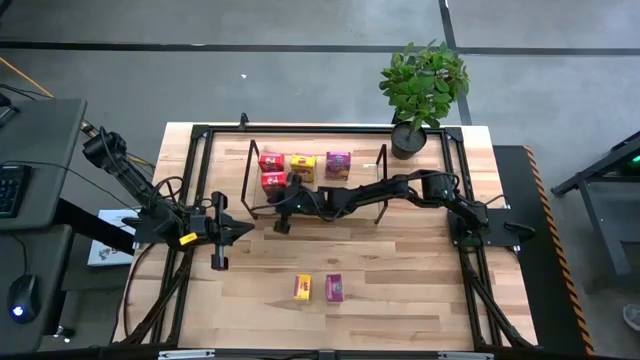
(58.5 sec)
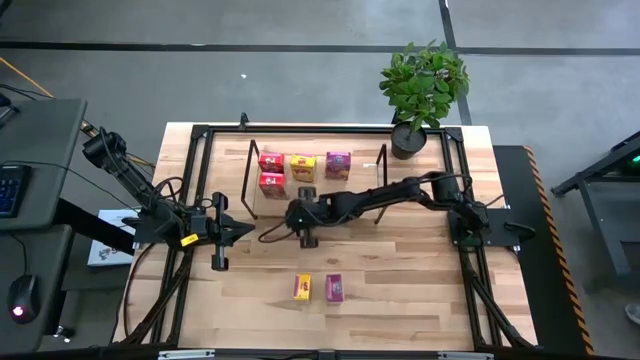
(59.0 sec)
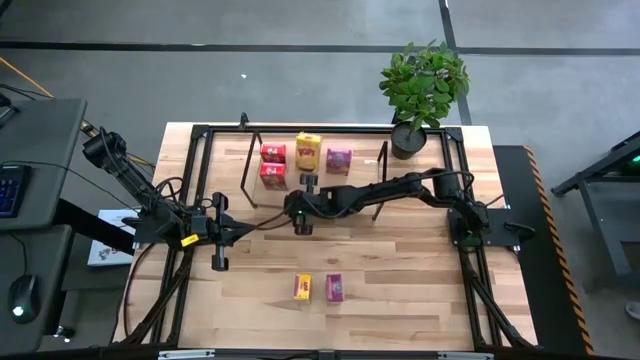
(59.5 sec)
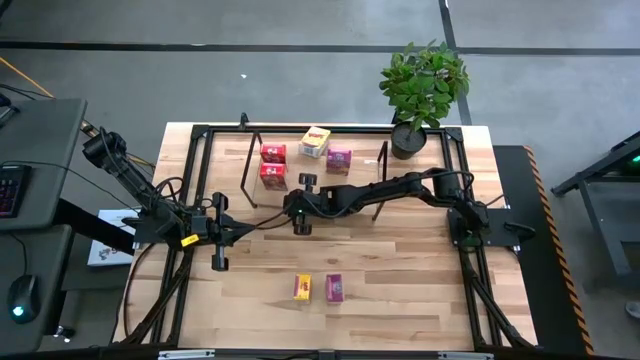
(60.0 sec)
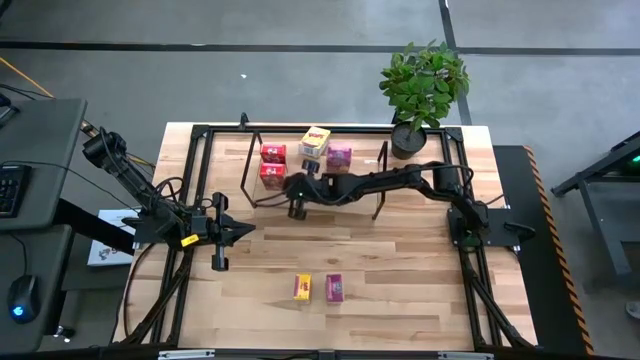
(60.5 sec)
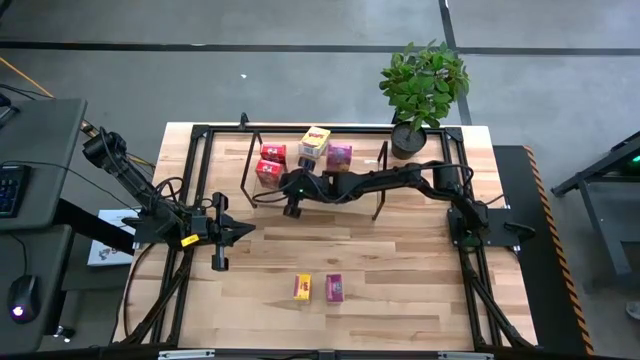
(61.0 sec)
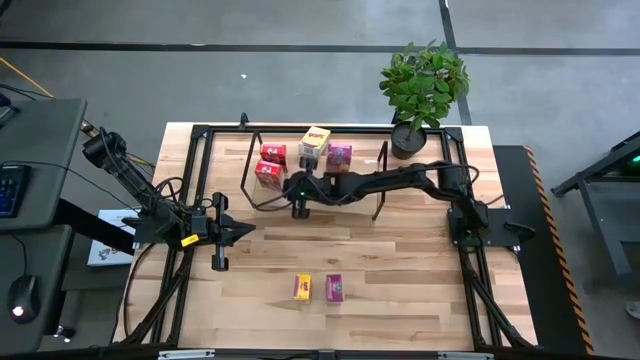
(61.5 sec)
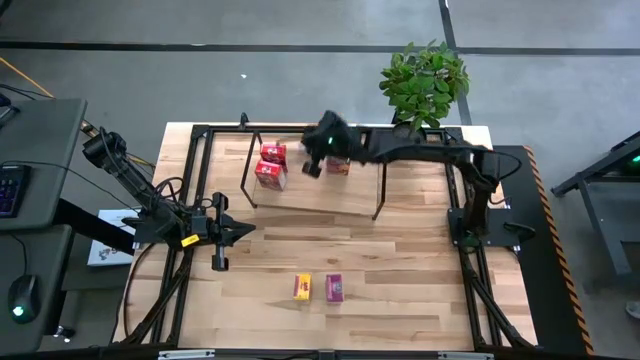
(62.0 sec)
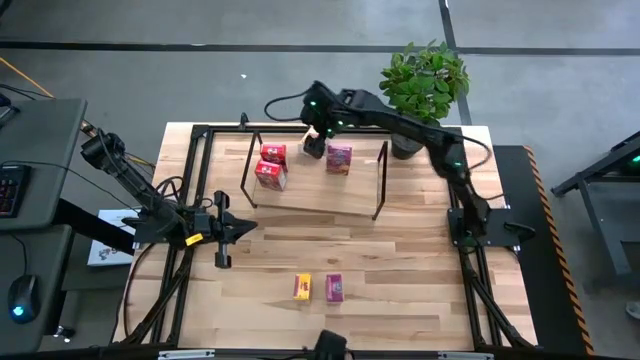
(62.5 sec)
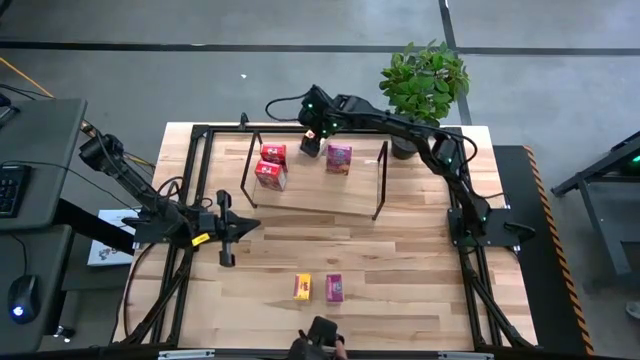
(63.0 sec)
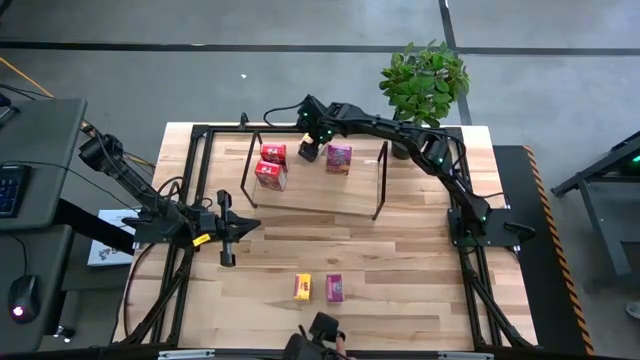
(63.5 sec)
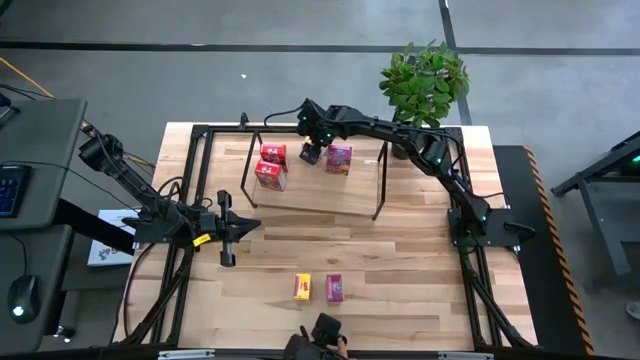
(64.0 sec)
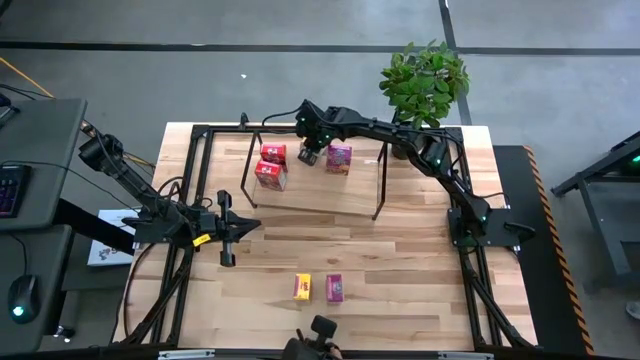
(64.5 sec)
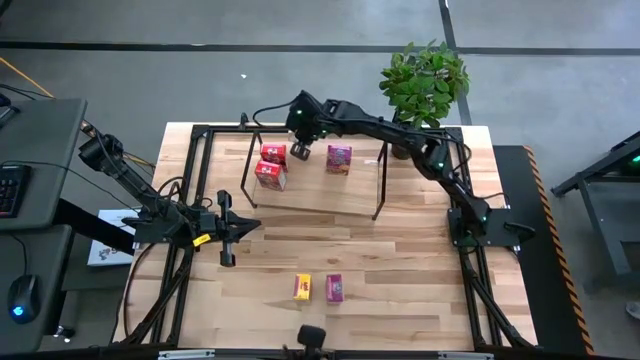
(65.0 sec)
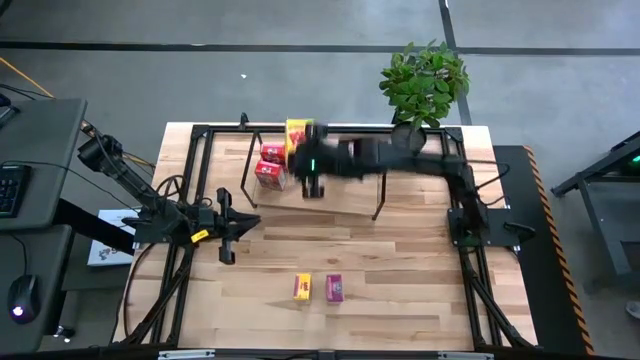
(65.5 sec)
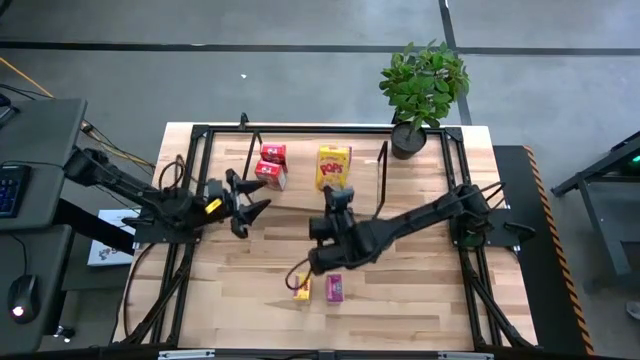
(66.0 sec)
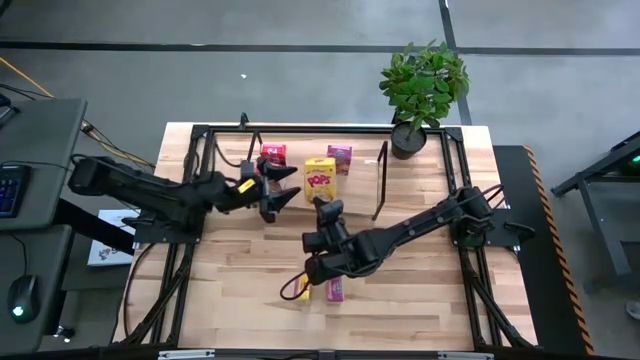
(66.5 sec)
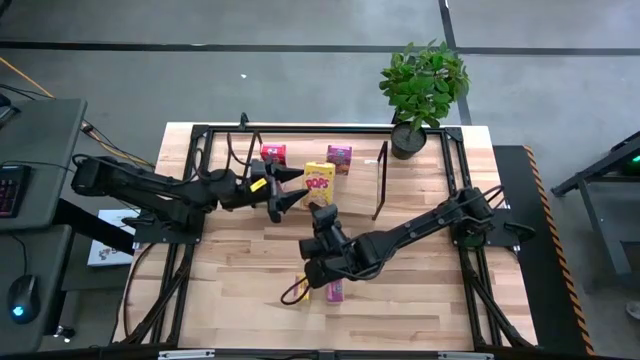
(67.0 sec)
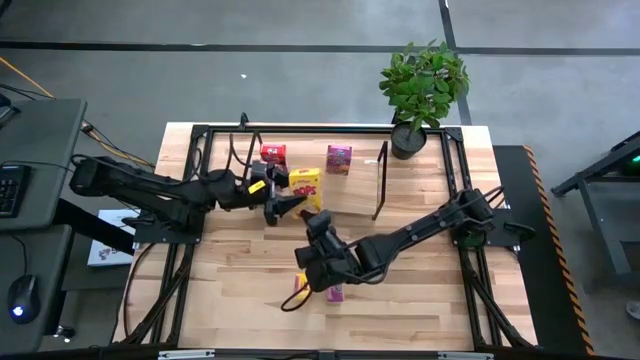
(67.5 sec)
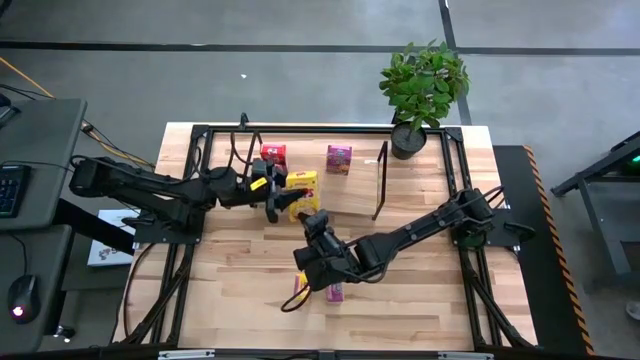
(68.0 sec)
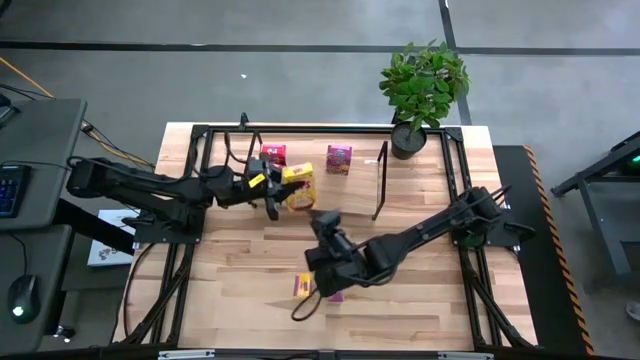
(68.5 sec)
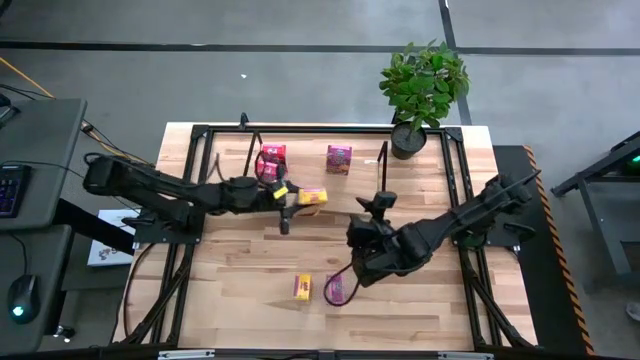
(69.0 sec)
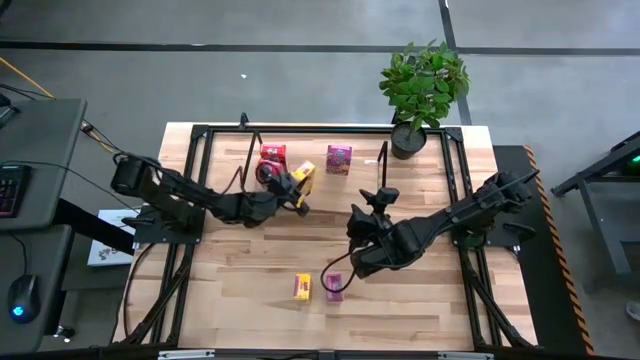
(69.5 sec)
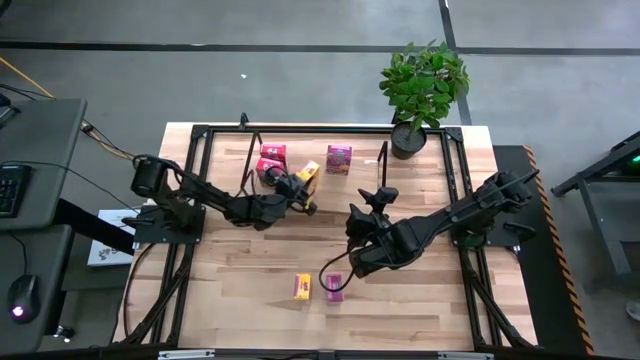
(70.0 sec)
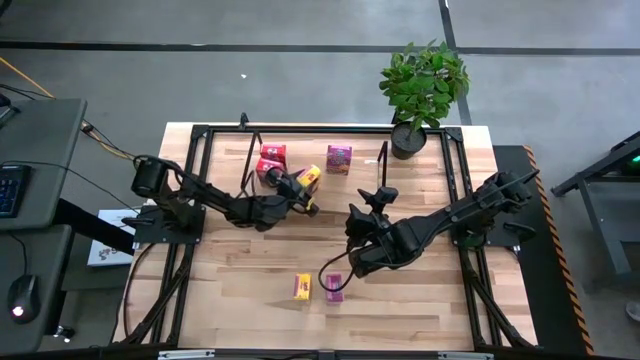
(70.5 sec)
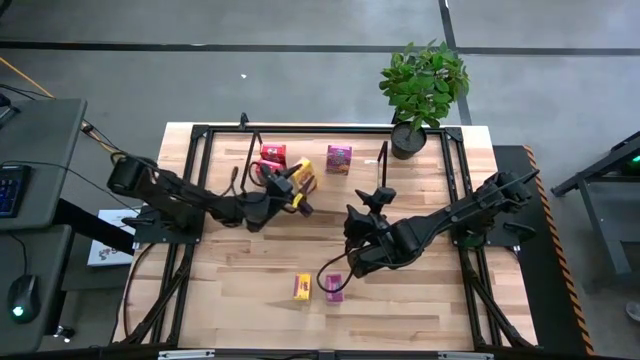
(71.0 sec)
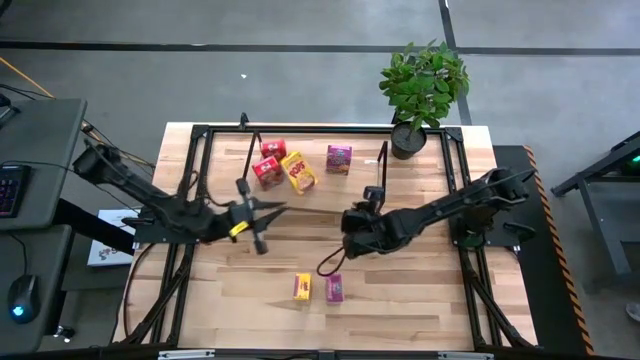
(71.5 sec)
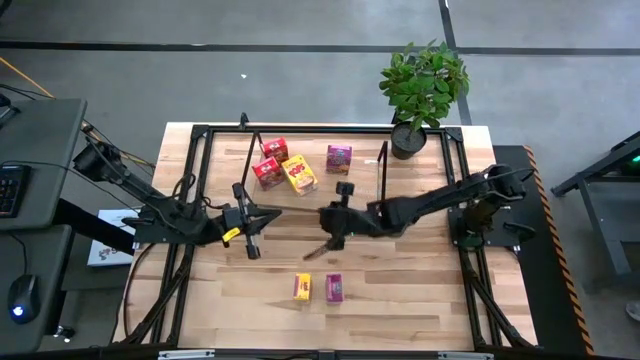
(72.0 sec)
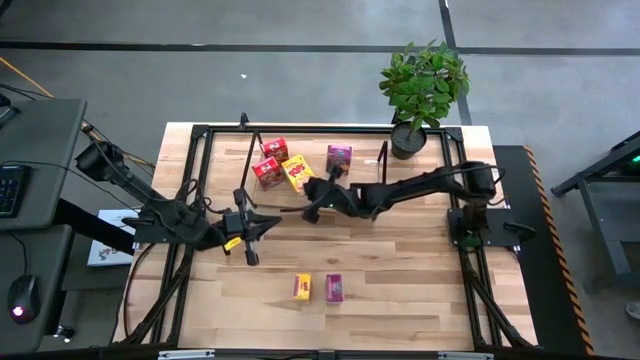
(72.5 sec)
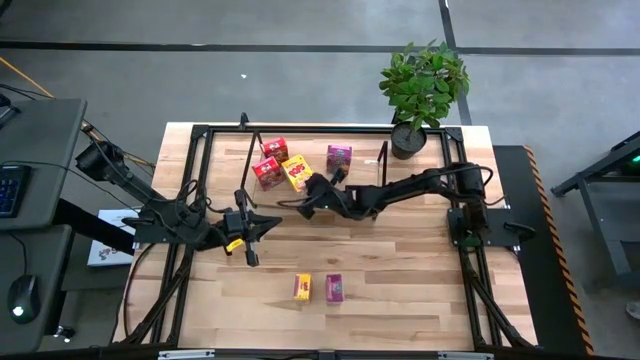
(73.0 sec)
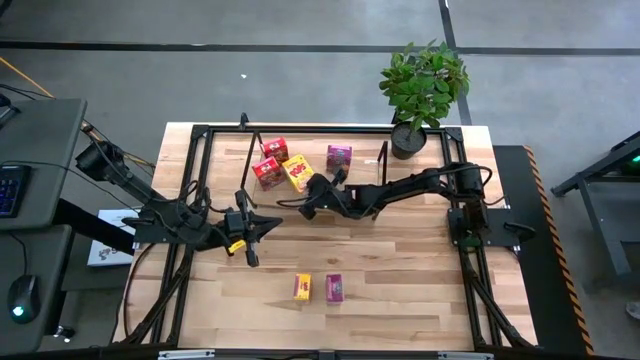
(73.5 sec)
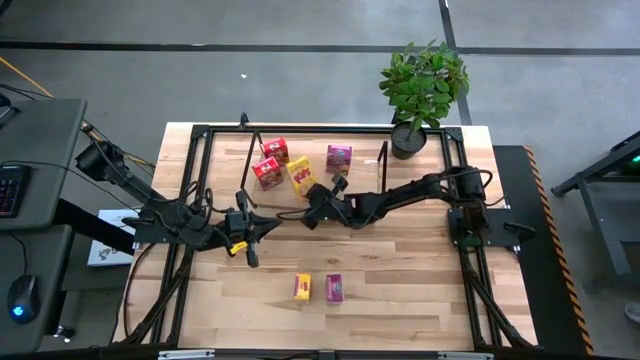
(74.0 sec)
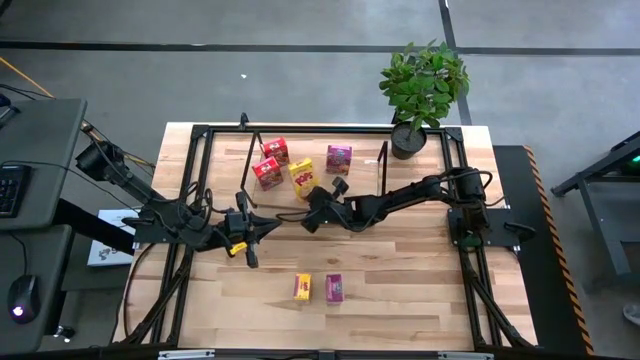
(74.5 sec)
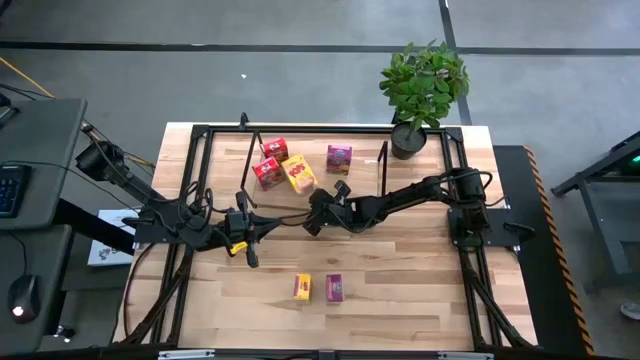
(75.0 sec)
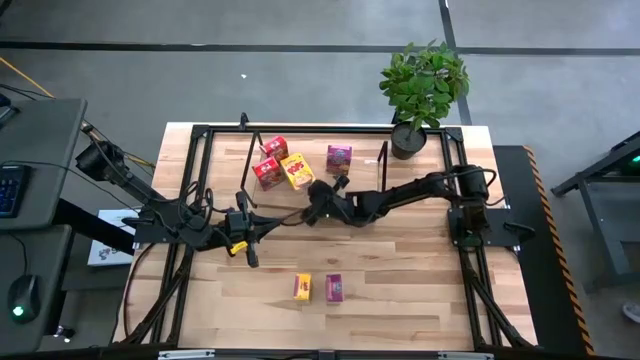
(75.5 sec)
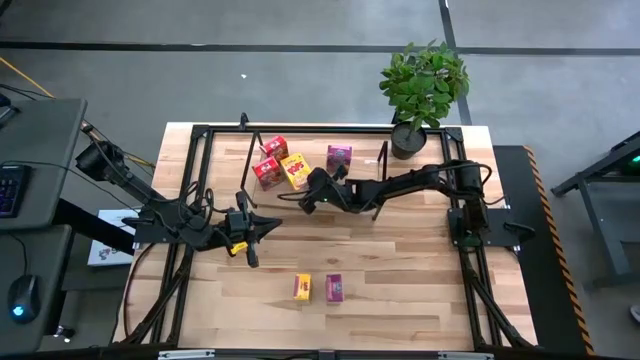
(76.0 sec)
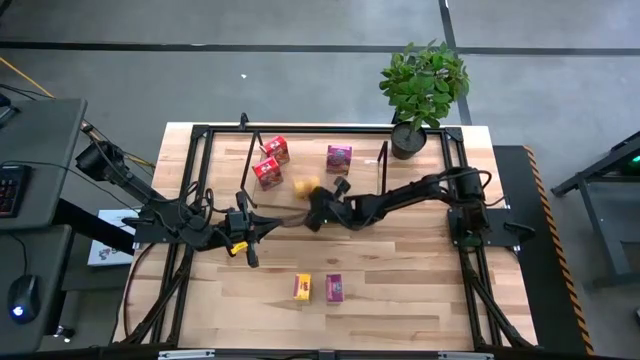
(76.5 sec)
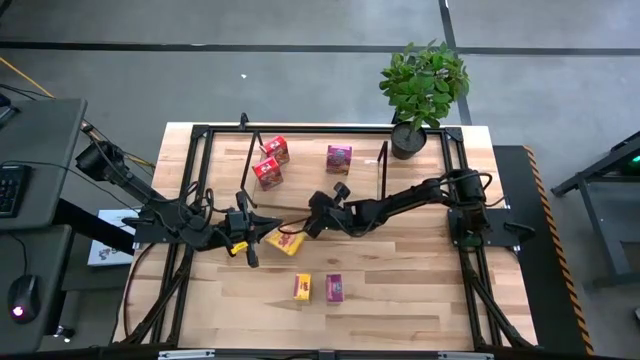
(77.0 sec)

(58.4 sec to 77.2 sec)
Task: Stack cereal on shelf
Put the yellow cereal box on the shelf

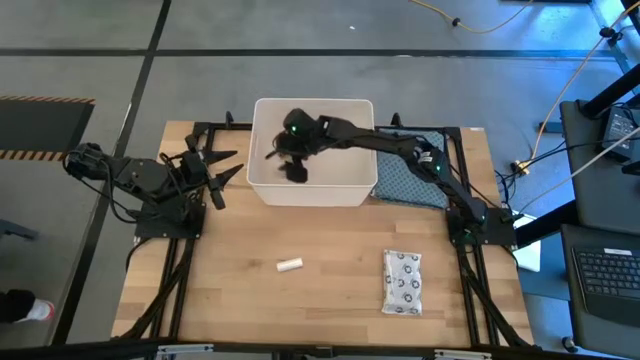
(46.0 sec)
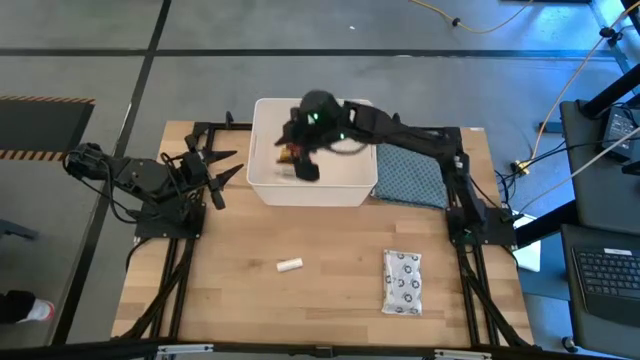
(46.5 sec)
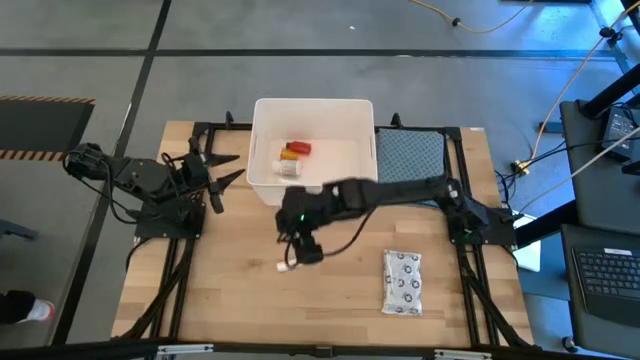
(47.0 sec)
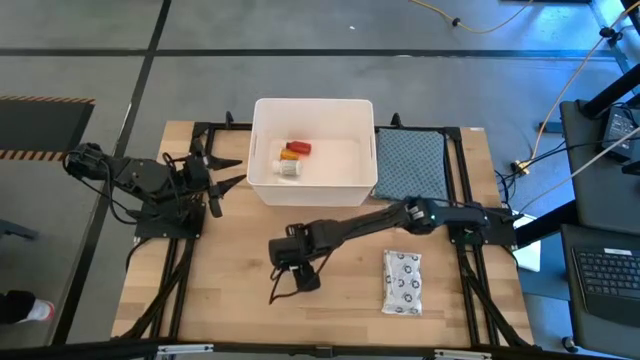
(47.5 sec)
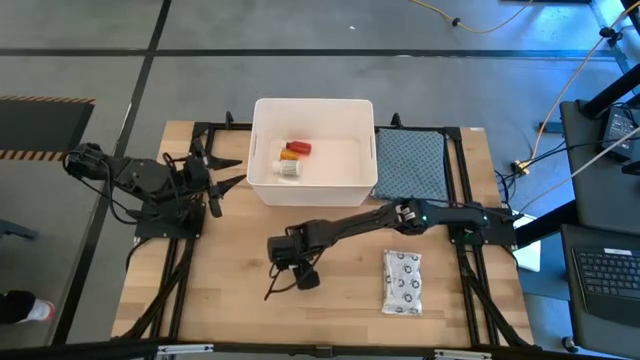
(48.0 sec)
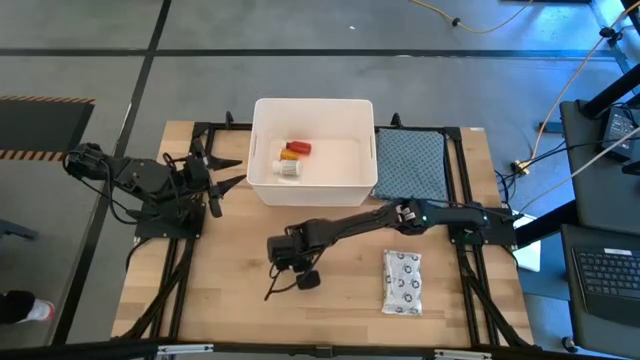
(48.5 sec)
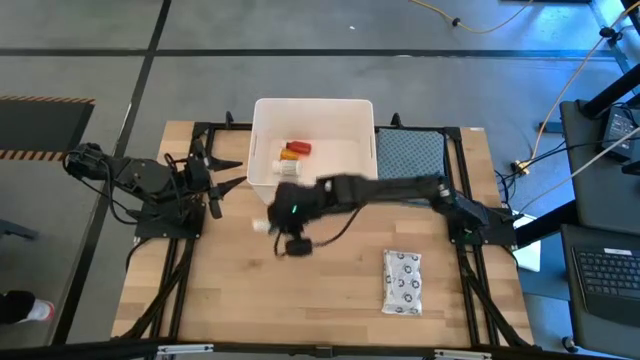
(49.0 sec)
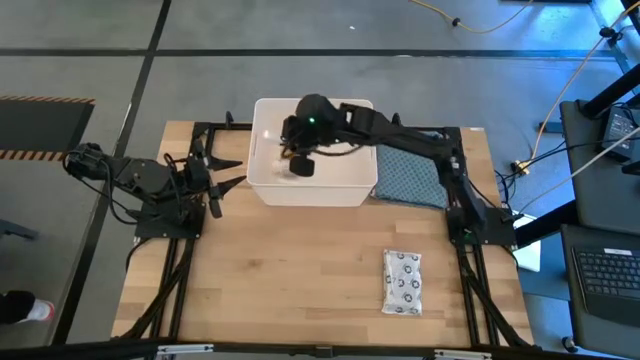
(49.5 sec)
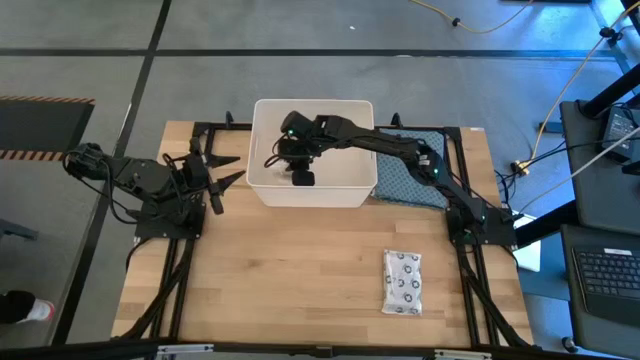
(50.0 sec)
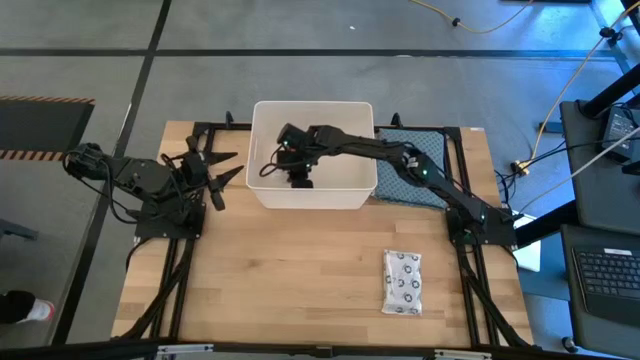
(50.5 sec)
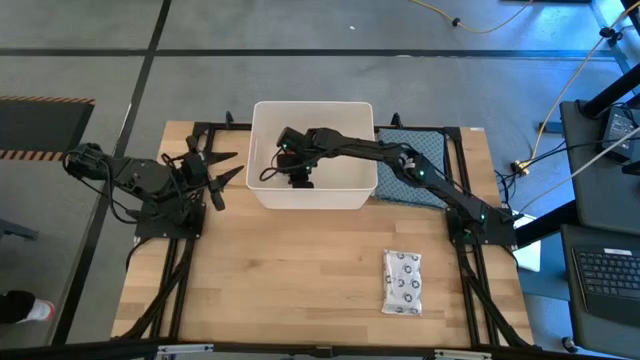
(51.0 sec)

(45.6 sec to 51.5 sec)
Task: Pick & place medical supplies in basket/bin
Put the rolled white gauze into the white bin
